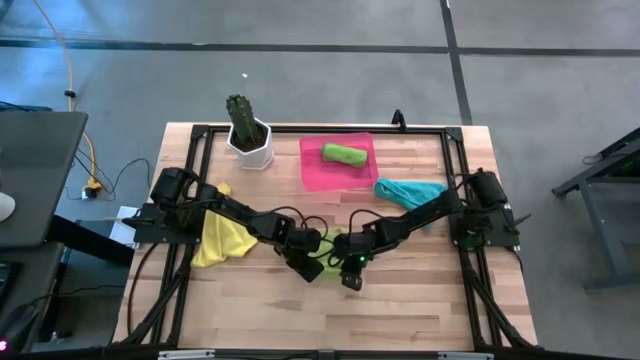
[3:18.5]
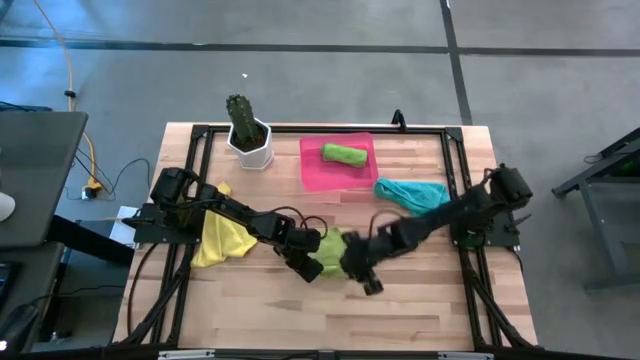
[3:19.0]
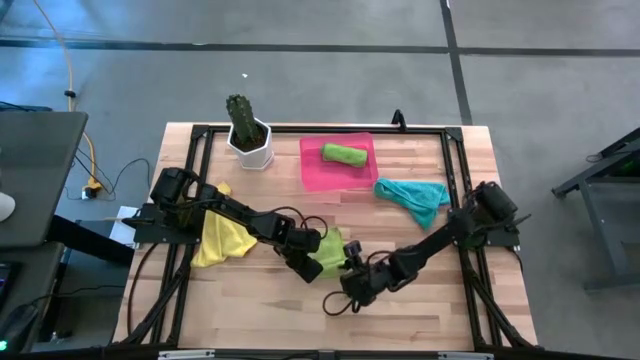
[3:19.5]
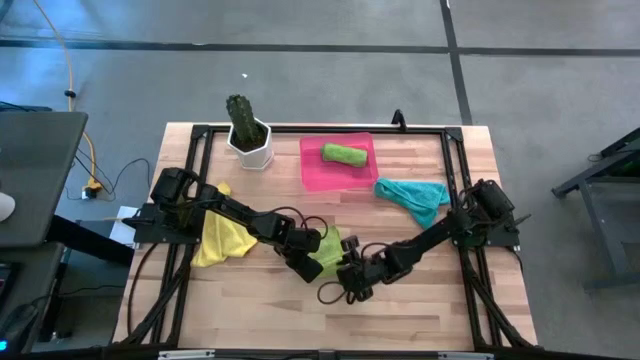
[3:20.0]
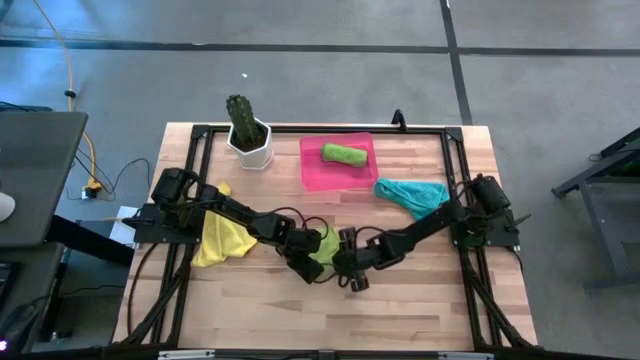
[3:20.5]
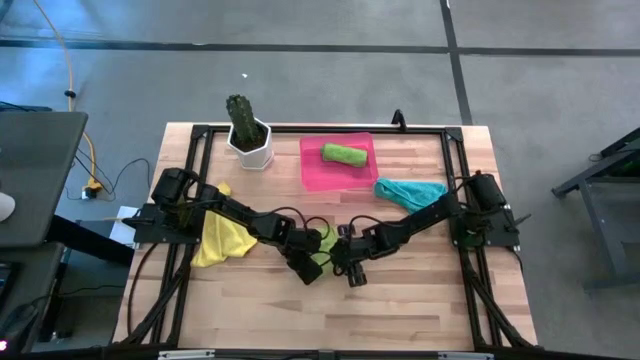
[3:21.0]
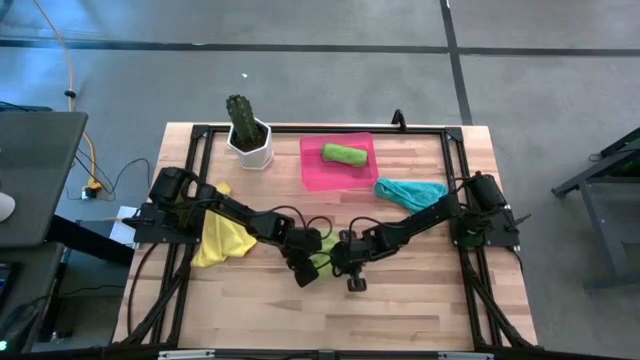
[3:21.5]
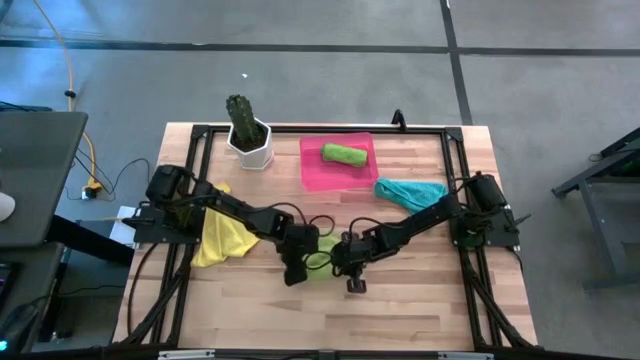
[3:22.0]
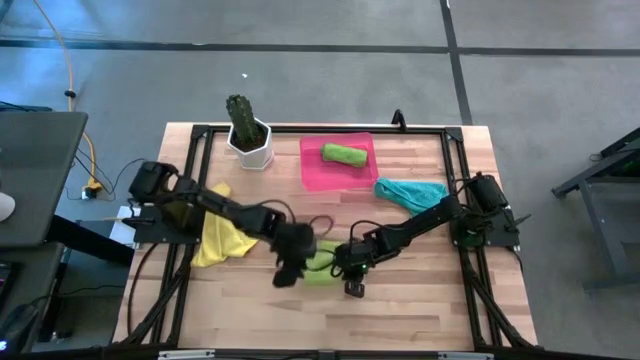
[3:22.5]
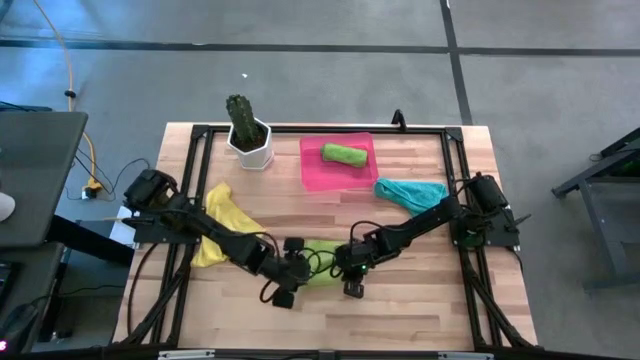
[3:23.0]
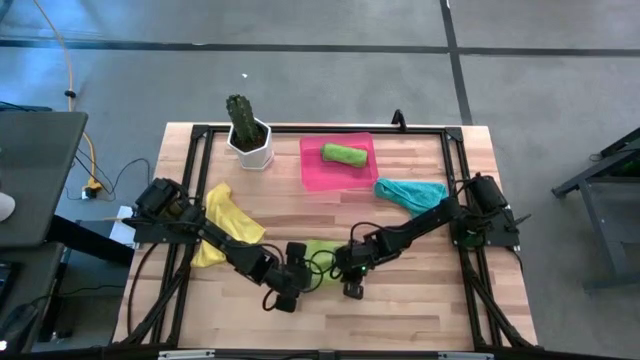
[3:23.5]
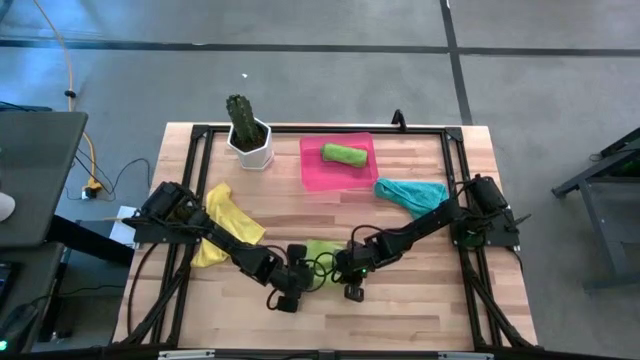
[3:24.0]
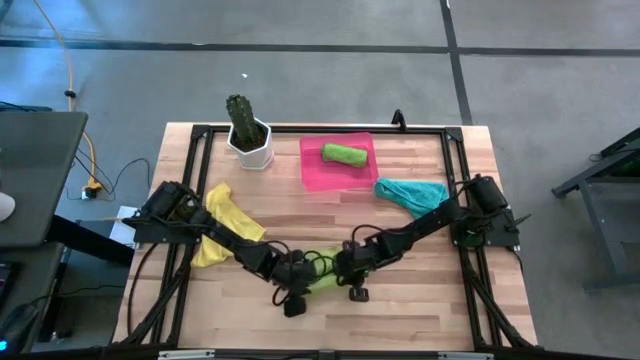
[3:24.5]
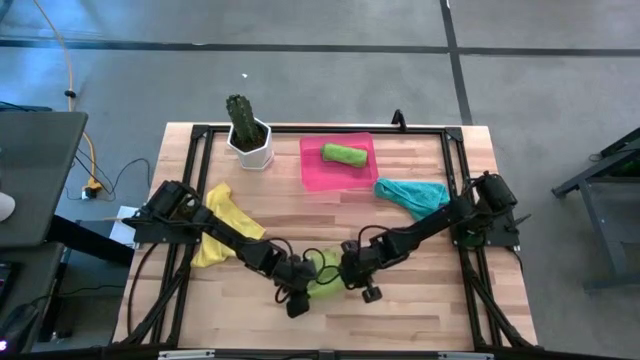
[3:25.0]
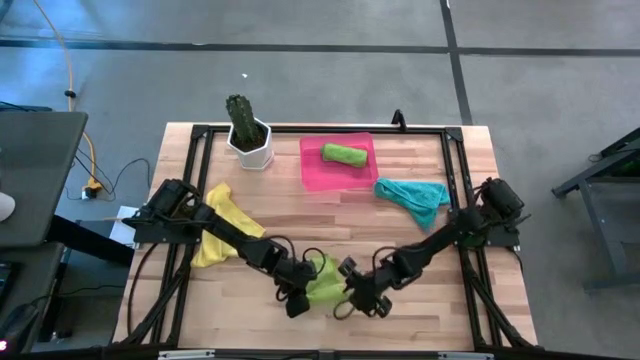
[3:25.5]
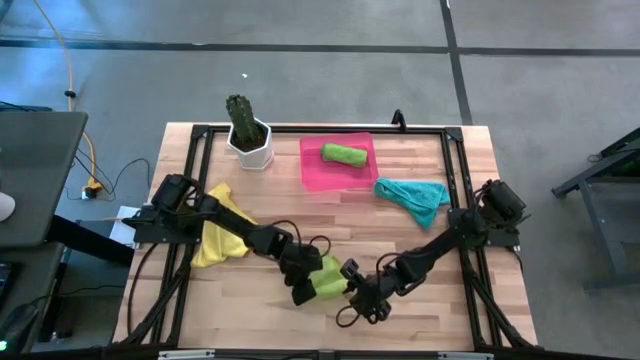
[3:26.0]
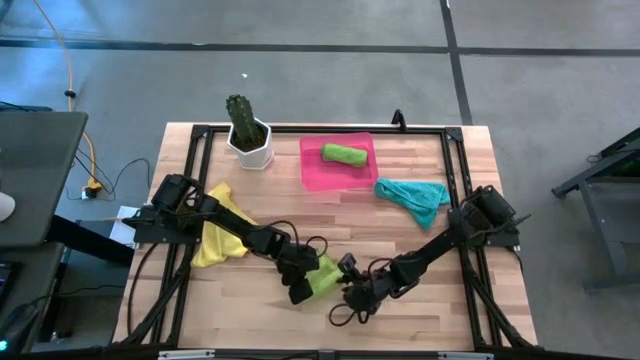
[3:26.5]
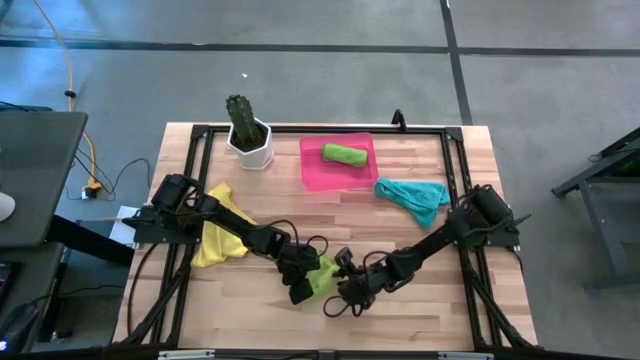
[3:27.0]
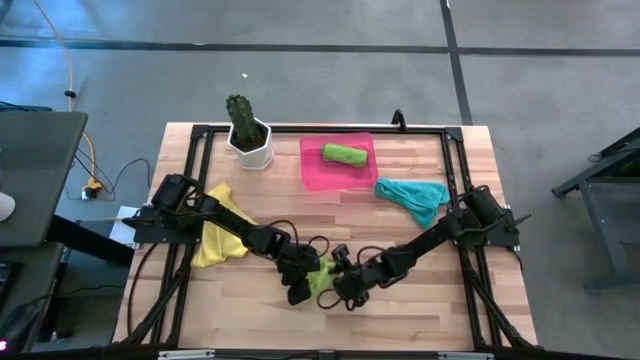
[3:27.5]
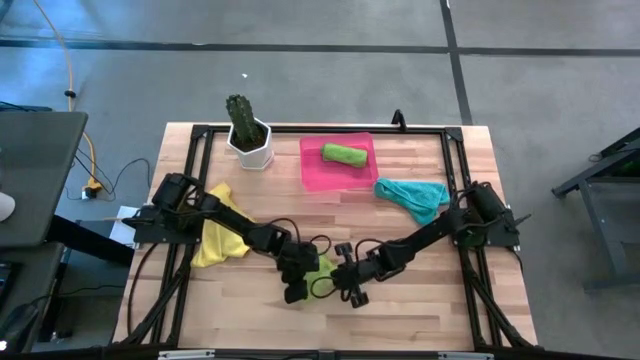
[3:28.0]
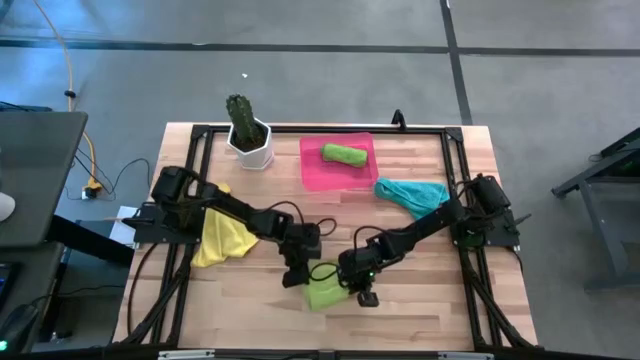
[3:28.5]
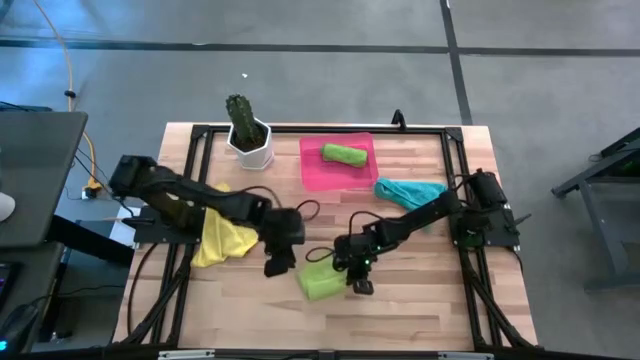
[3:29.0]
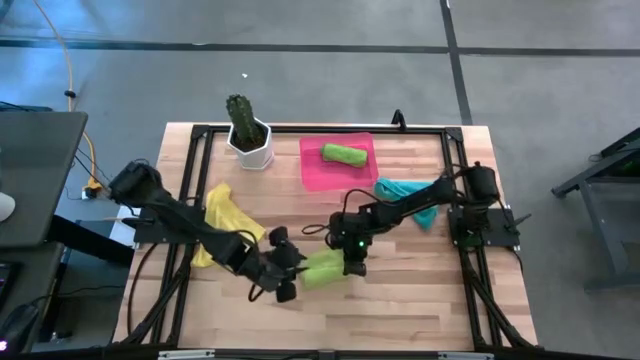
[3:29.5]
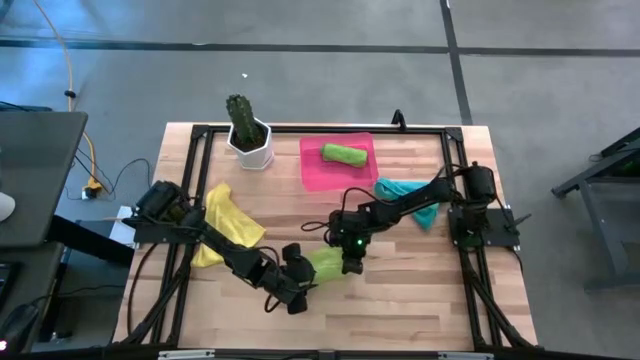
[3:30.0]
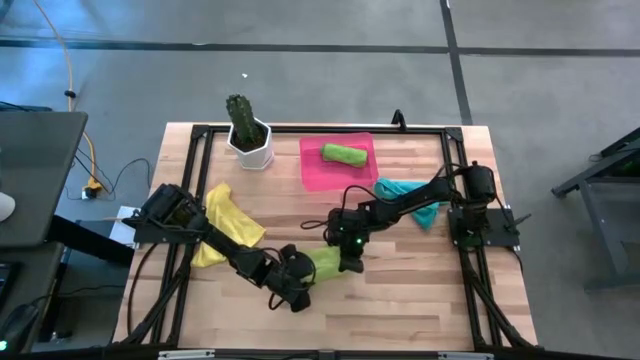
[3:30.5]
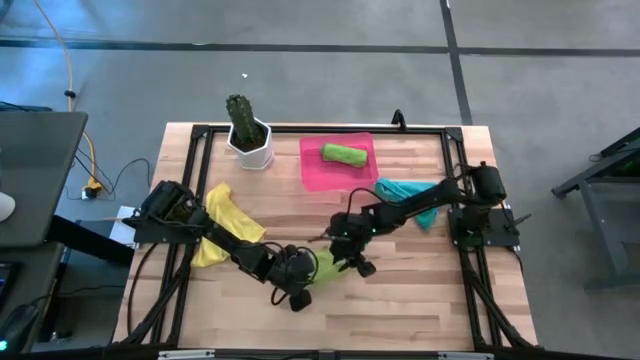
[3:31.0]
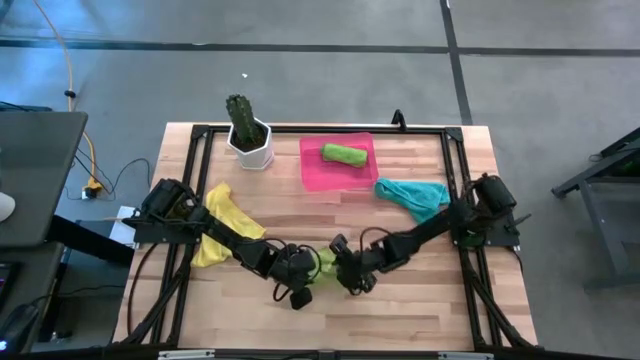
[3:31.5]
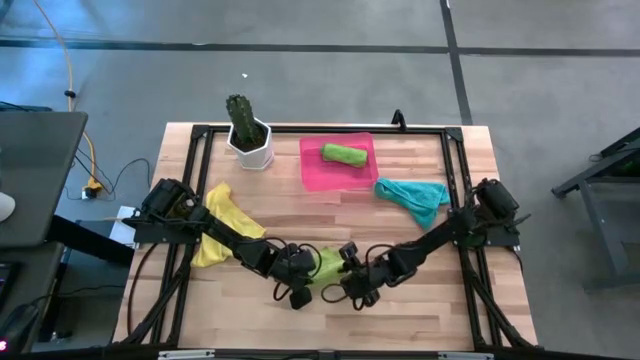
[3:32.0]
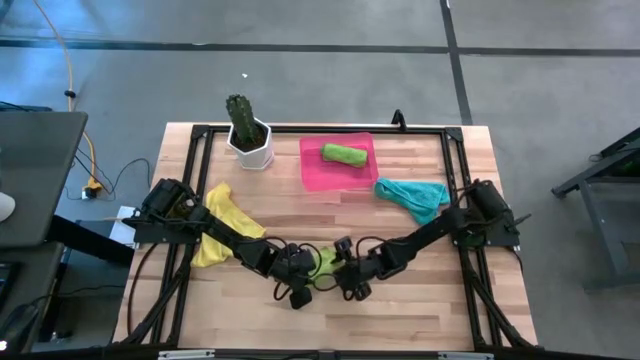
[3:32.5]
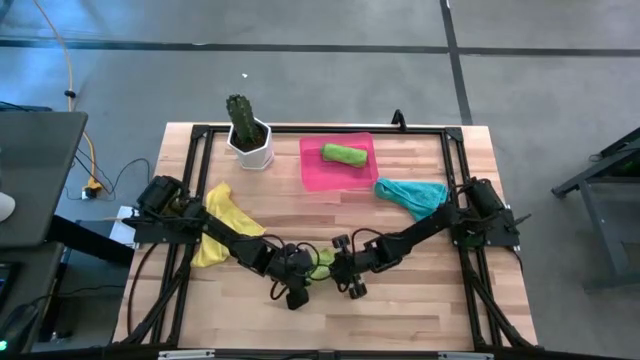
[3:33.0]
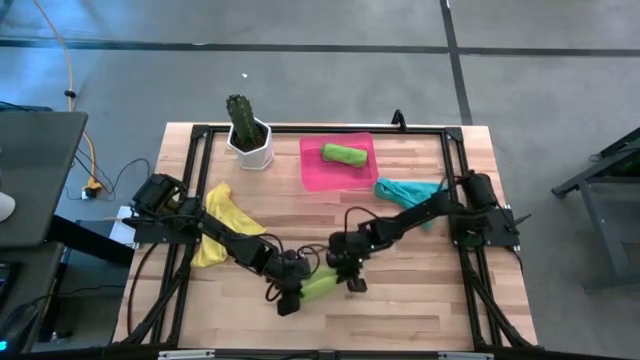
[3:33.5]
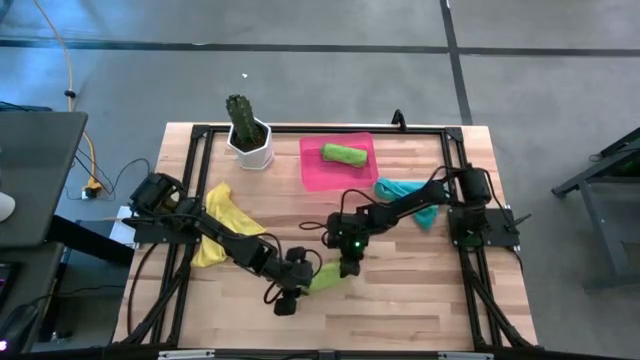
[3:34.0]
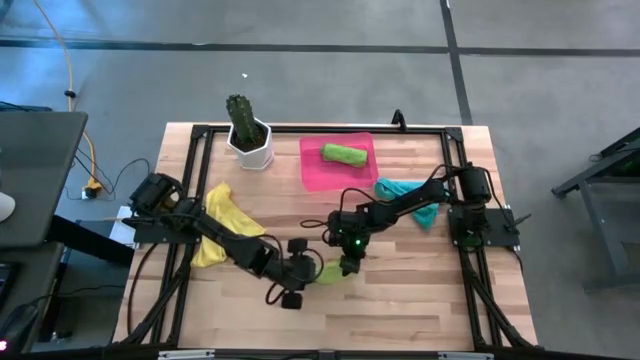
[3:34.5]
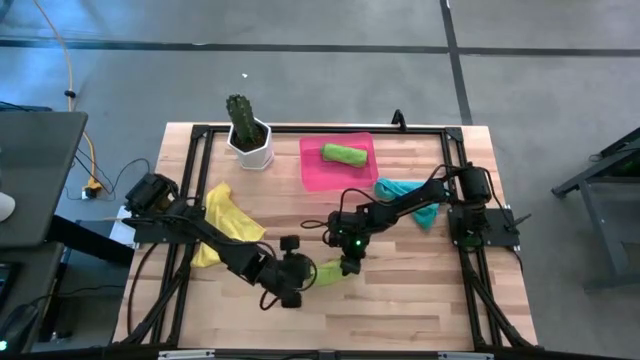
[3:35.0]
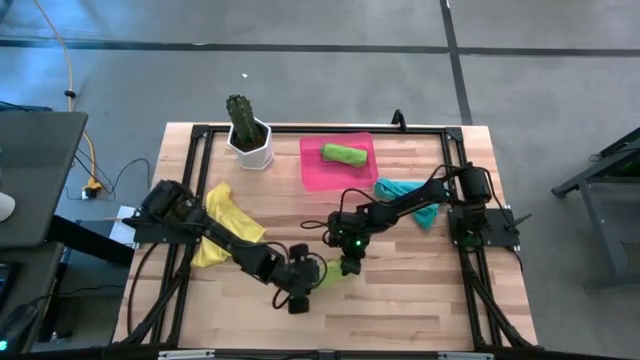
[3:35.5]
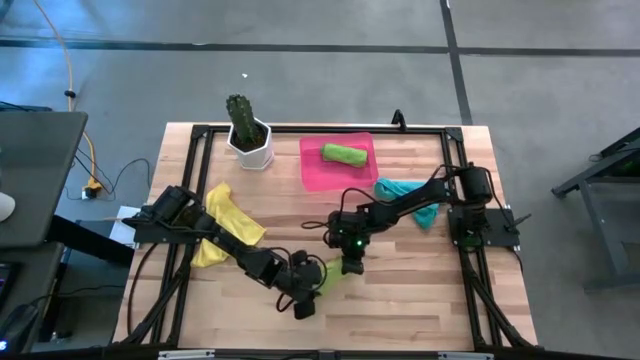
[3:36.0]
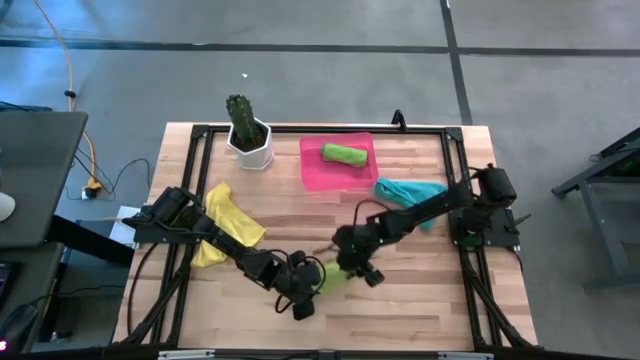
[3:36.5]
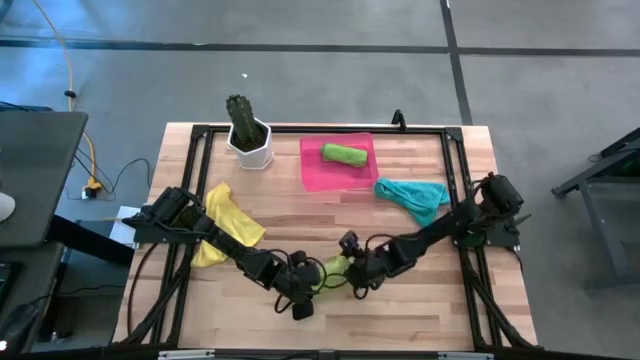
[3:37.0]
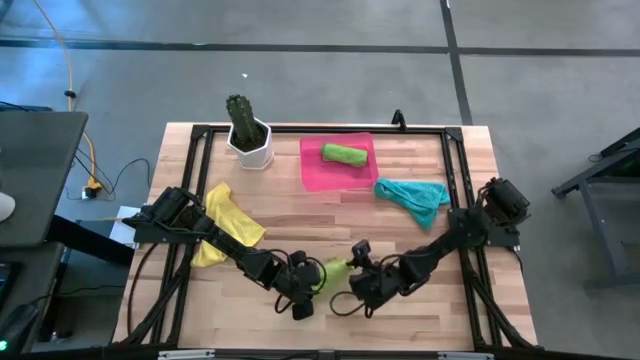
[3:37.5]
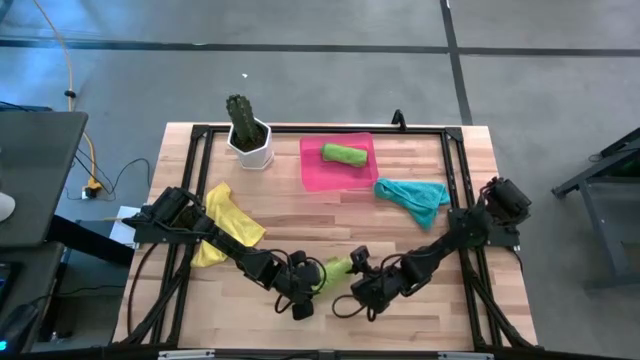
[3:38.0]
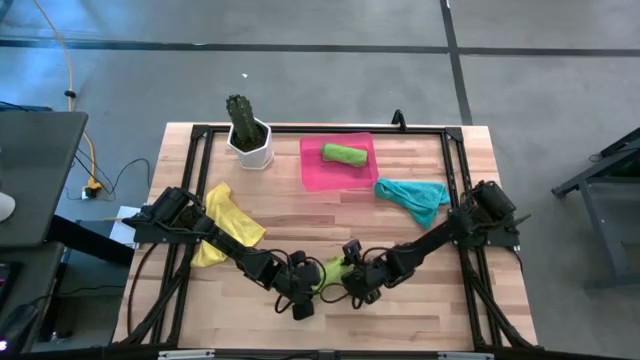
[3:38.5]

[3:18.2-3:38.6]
Task: Roll microfiber towels into tight, uniform cylinder then place into a basket
Roll the light green microfiber cloth

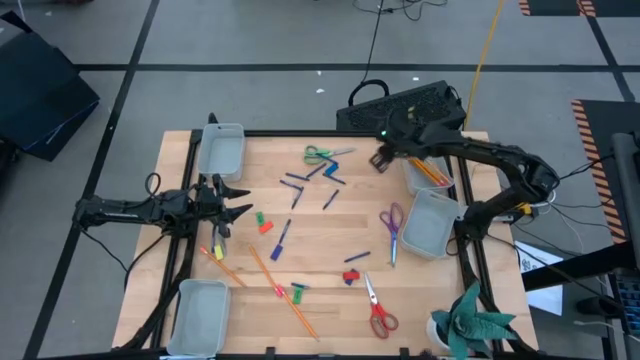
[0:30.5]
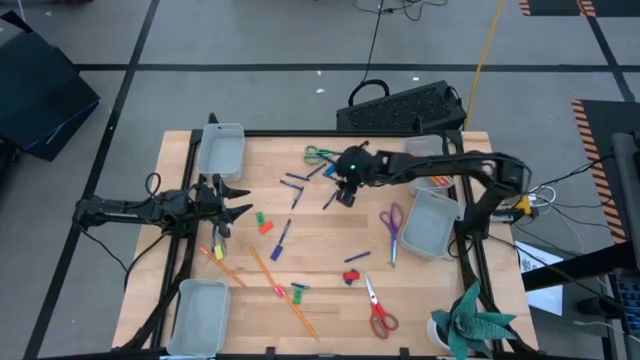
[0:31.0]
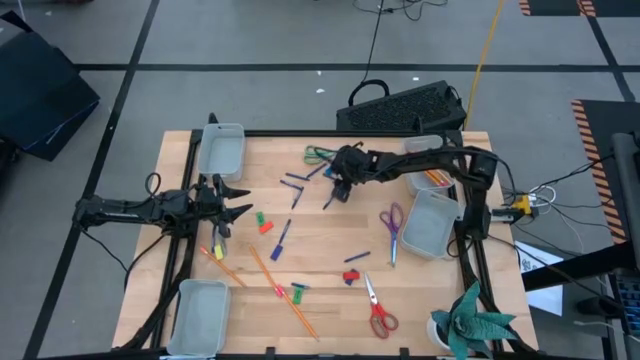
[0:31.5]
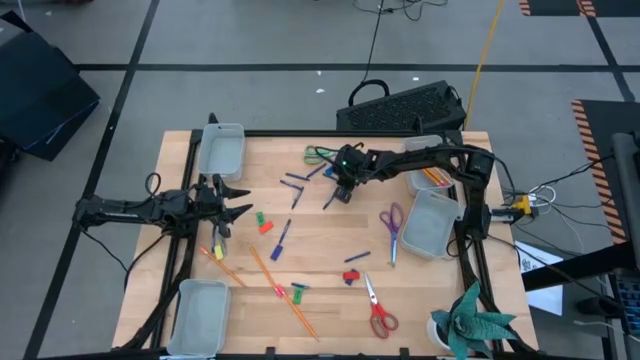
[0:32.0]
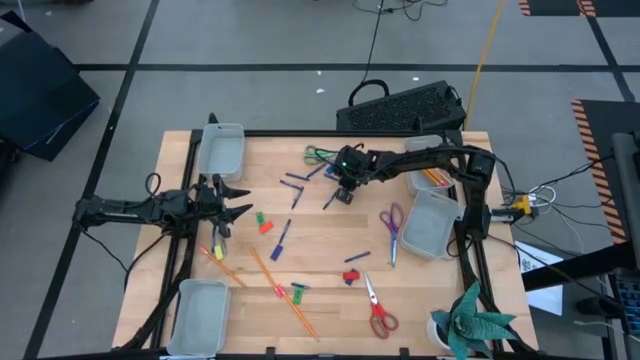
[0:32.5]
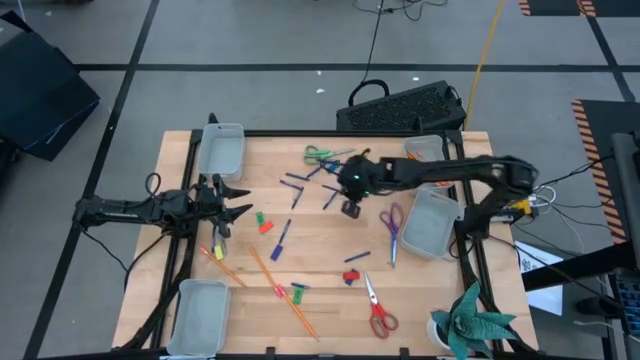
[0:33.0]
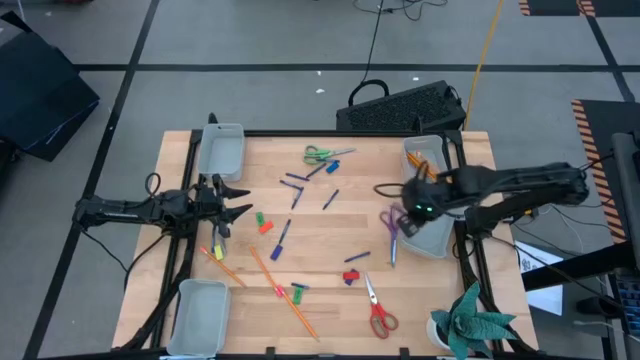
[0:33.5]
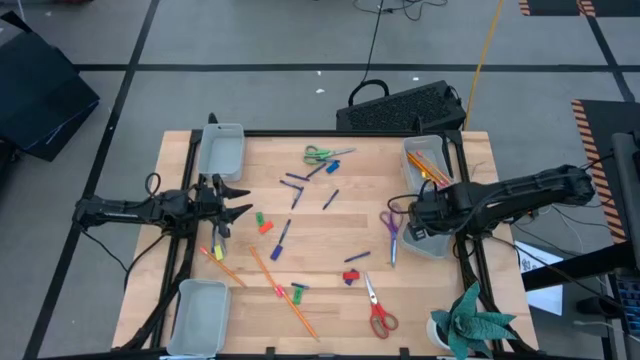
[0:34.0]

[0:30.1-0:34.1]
Task: Sort crayons/erasers/pens/pencils in bins
Put the blue crayon into the middle right gray bin
